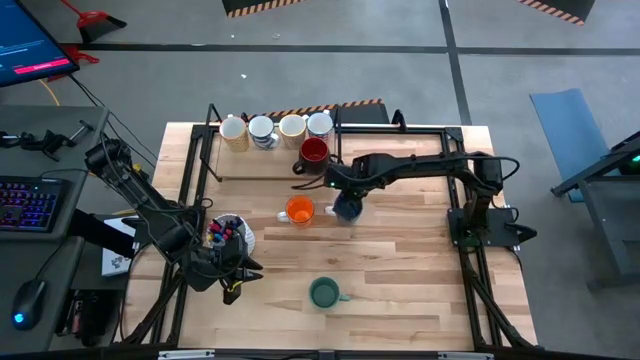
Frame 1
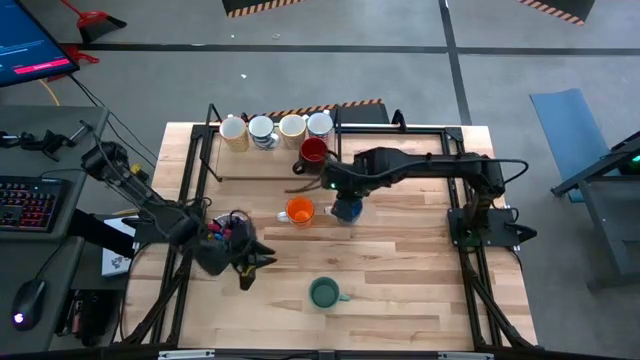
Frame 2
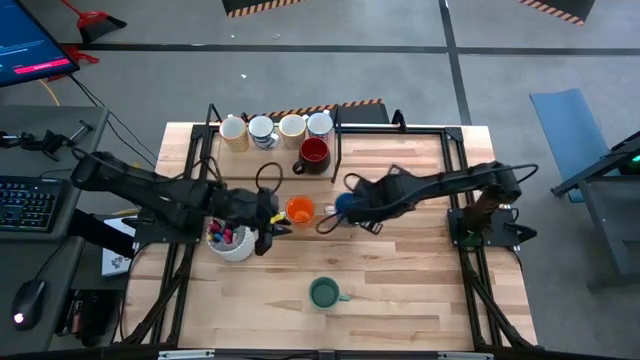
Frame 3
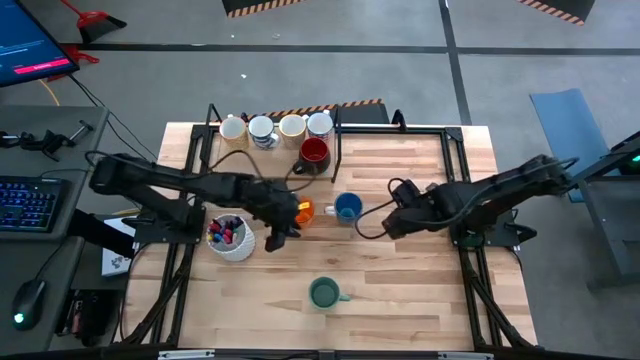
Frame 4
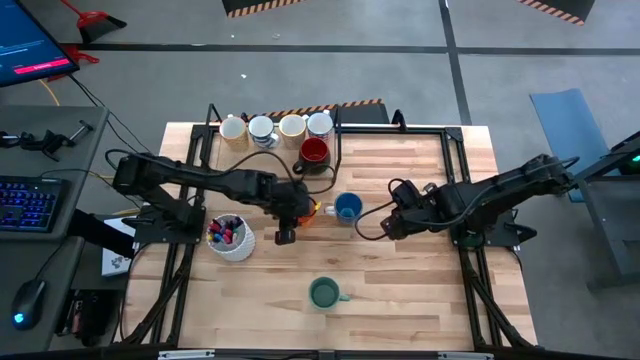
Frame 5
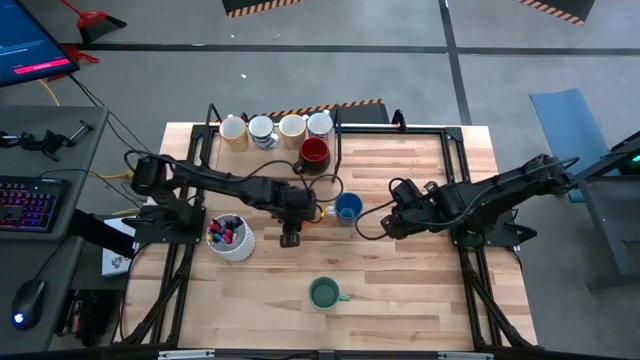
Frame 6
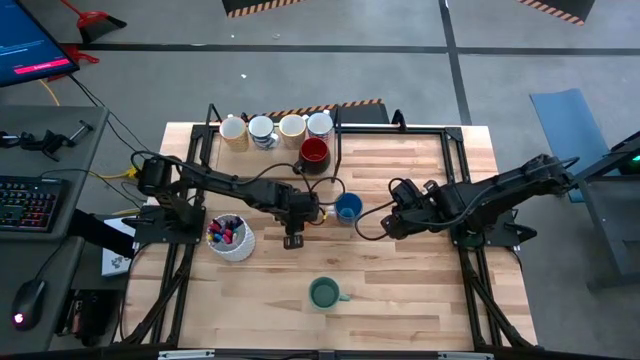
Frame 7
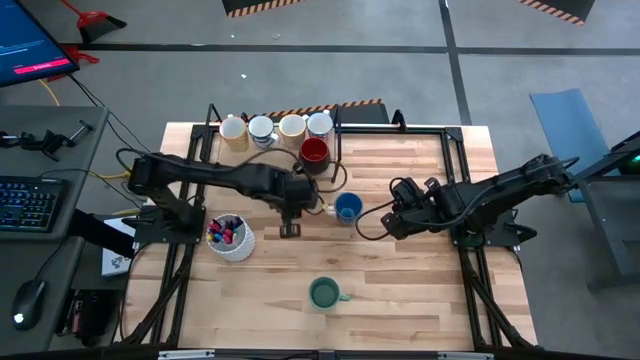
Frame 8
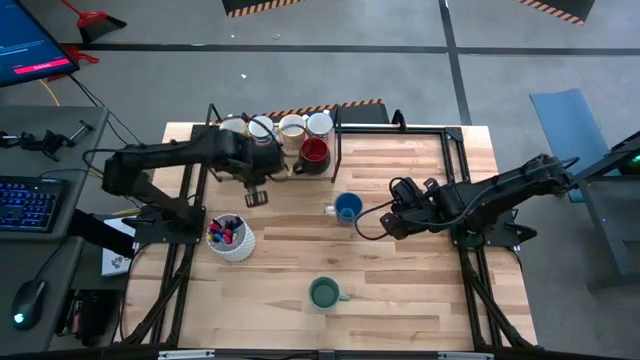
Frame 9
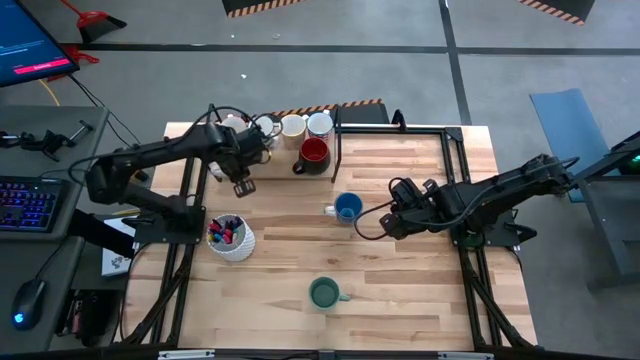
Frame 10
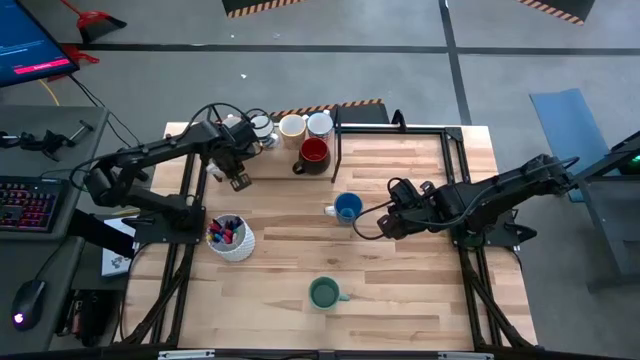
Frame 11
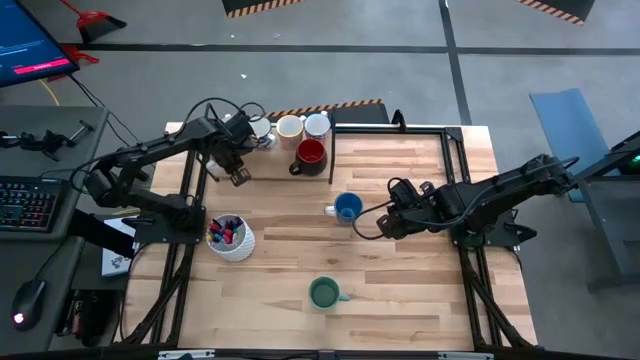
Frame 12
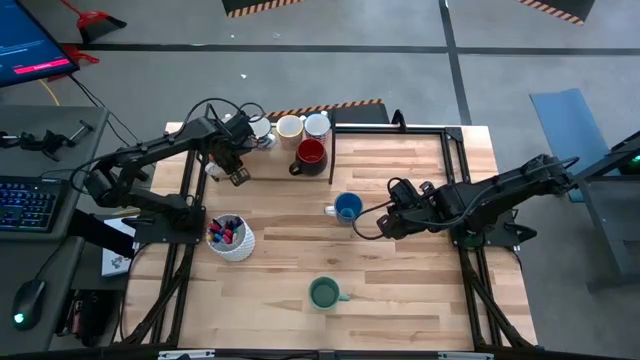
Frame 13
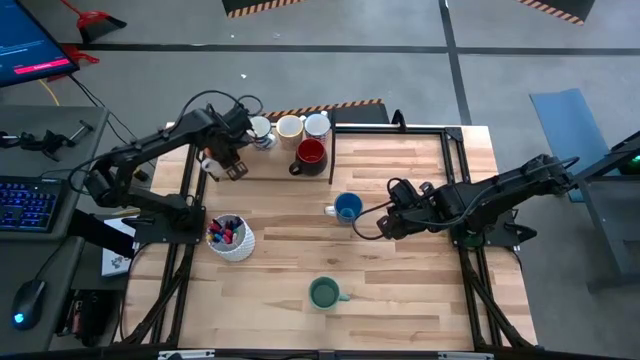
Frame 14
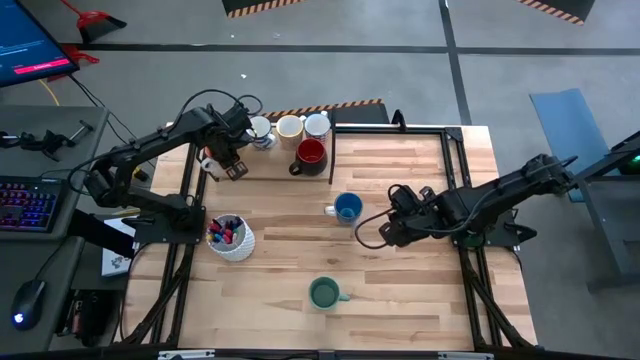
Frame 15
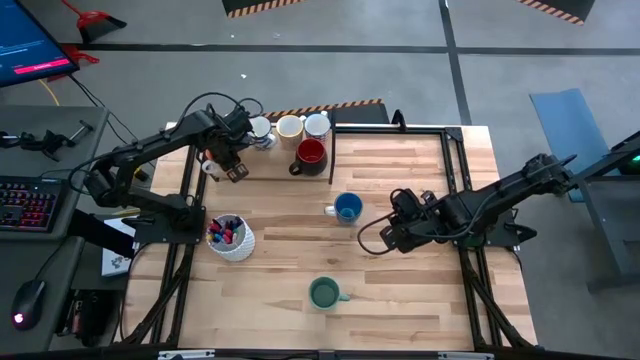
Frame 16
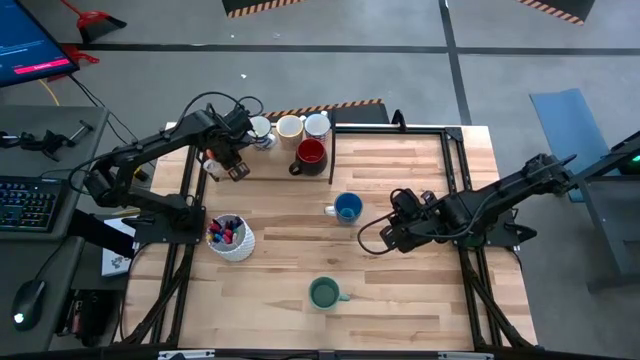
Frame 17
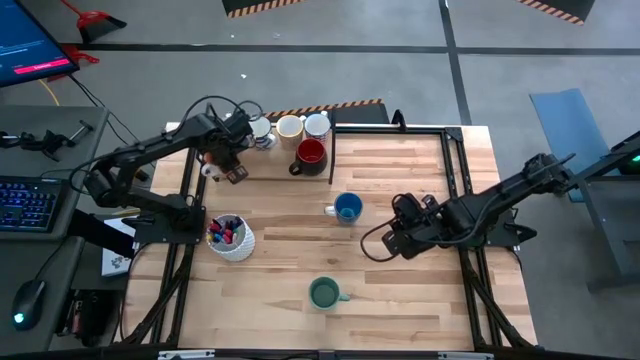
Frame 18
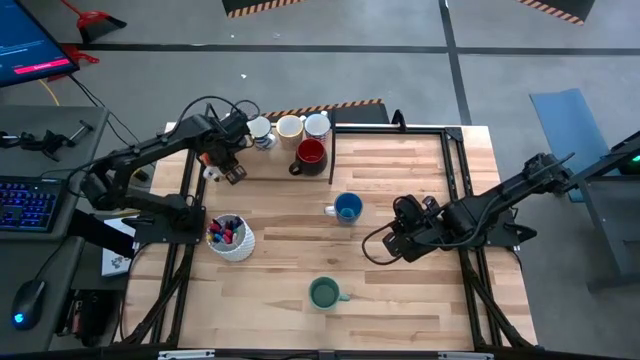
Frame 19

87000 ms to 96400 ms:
Task: Place coffee mugs
Put the orange mug on the shelf

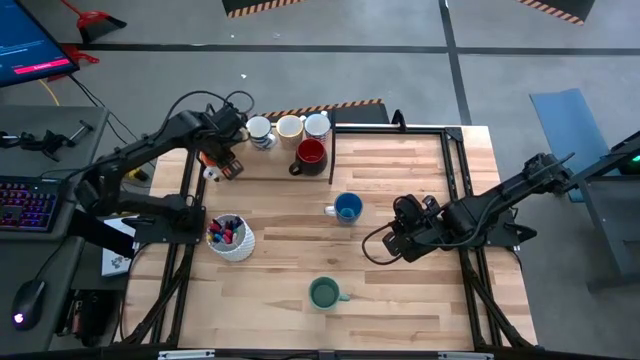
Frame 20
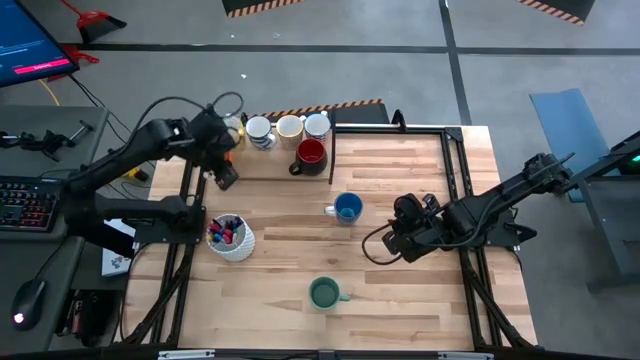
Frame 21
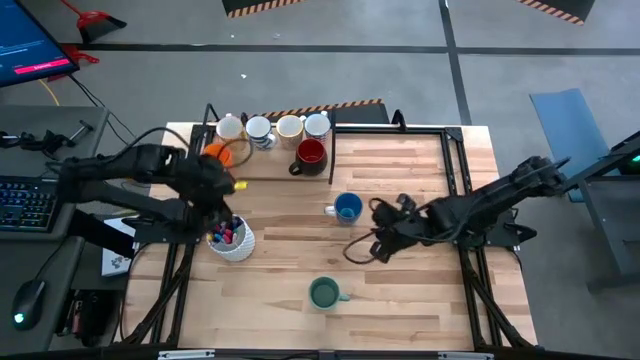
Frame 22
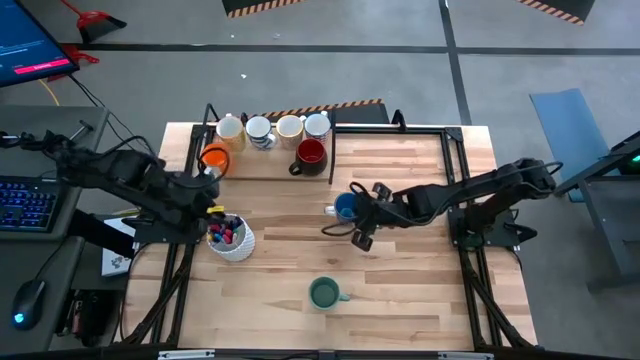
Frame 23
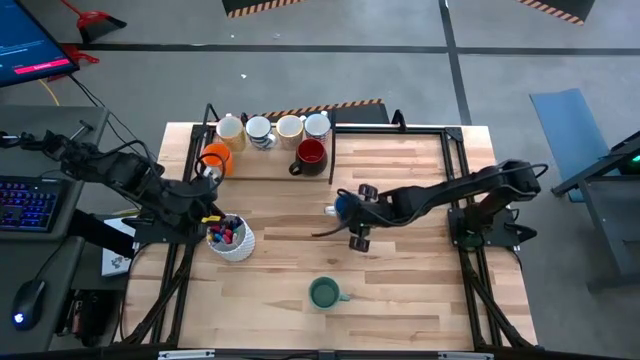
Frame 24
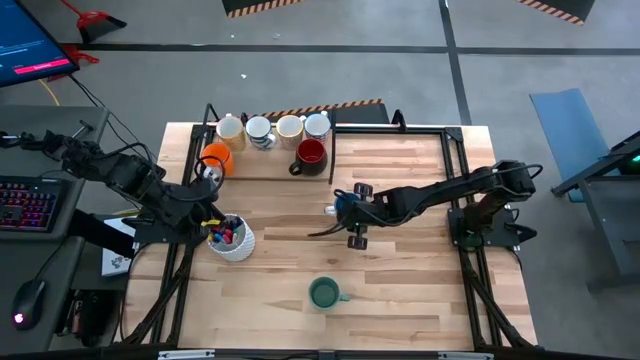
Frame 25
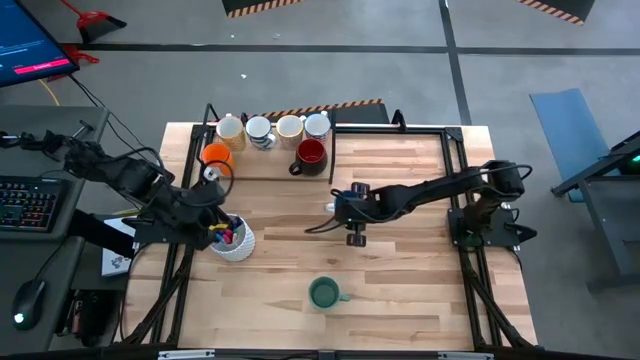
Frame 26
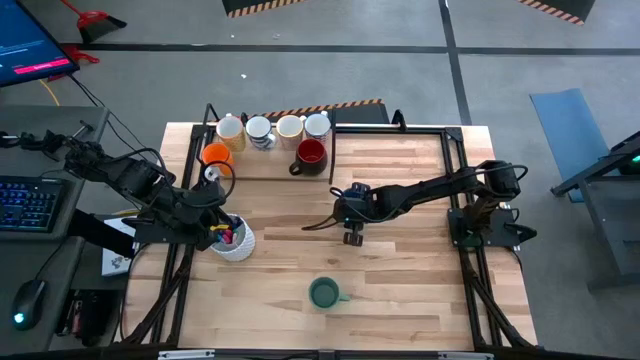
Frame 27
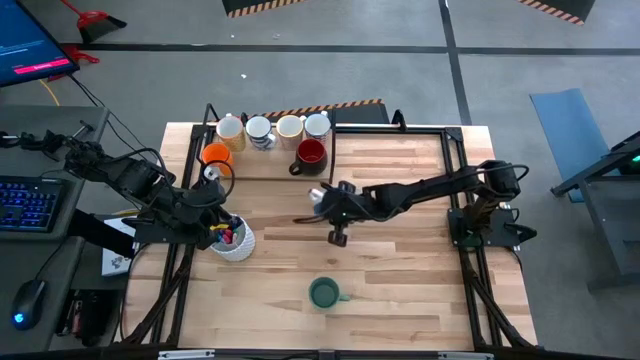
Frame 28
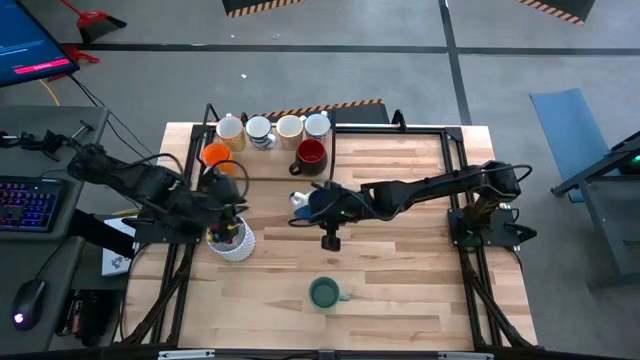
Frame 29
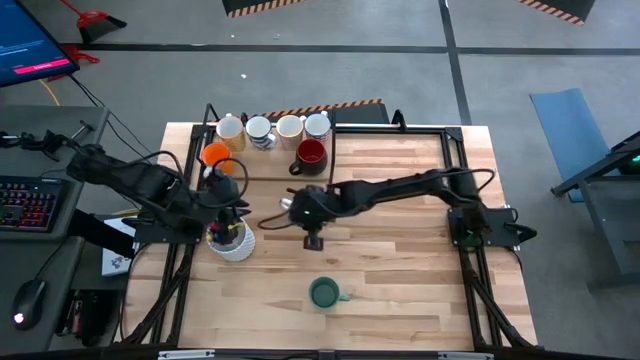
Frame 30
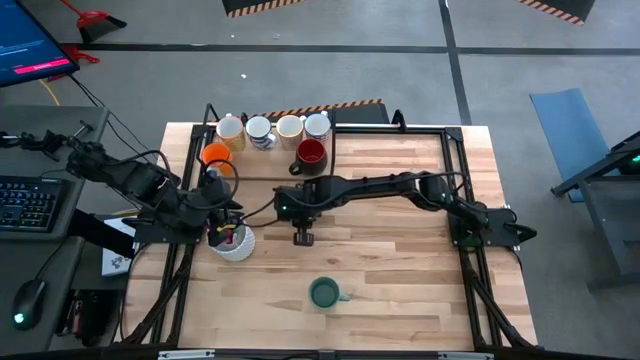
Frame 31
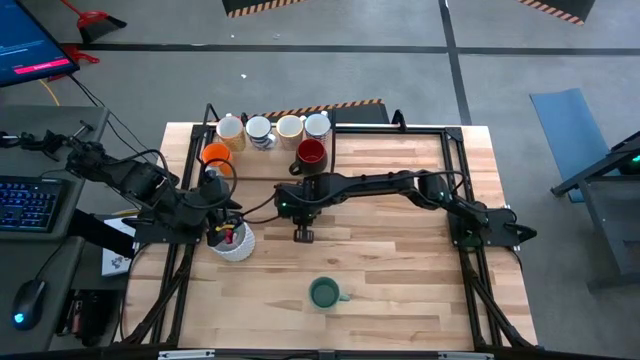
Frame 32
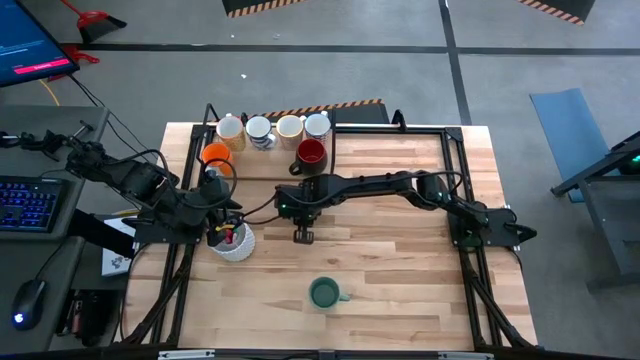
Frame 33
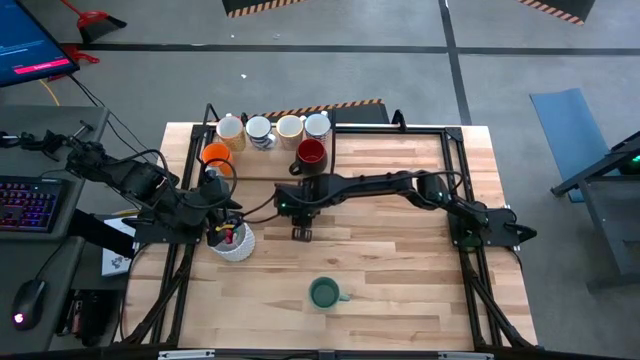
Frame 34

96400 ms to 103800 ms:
Move the blue mug to the center of the table

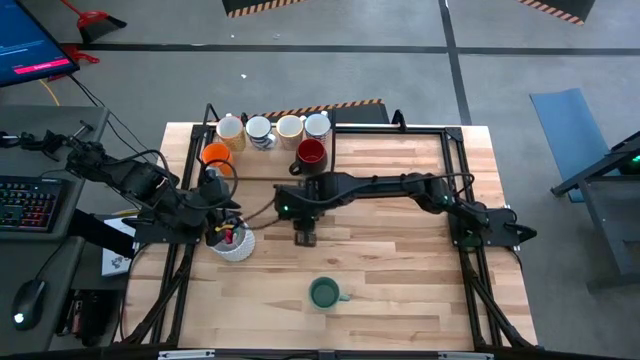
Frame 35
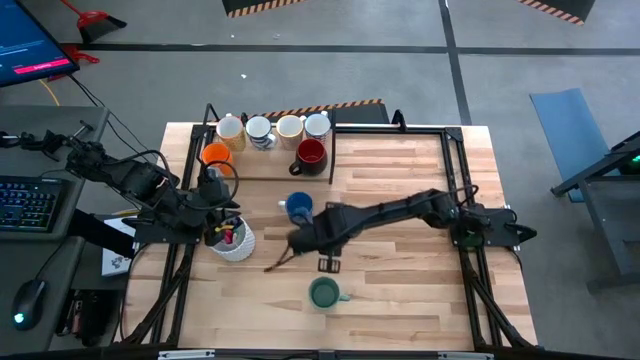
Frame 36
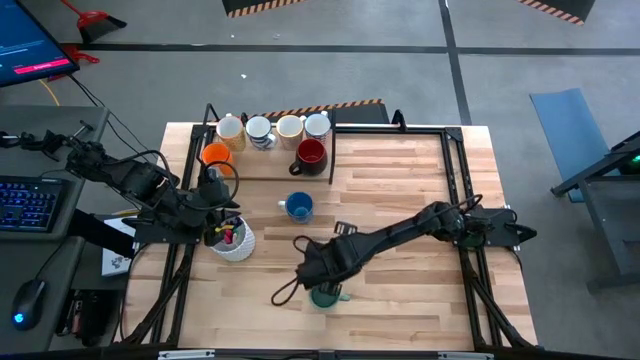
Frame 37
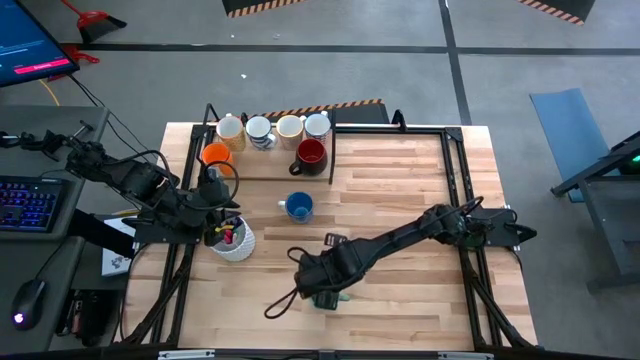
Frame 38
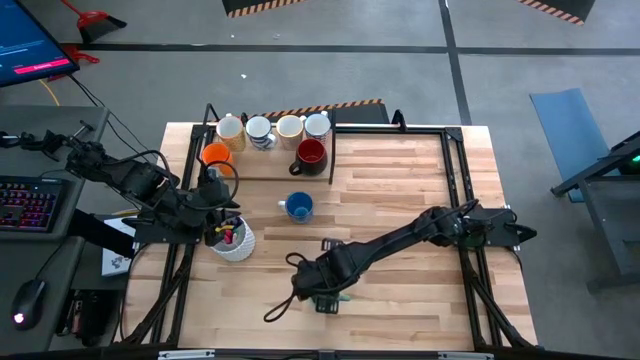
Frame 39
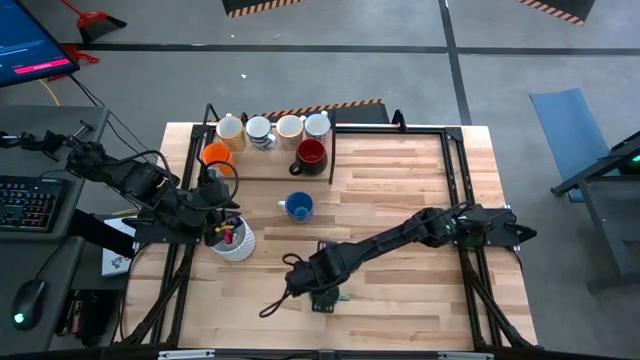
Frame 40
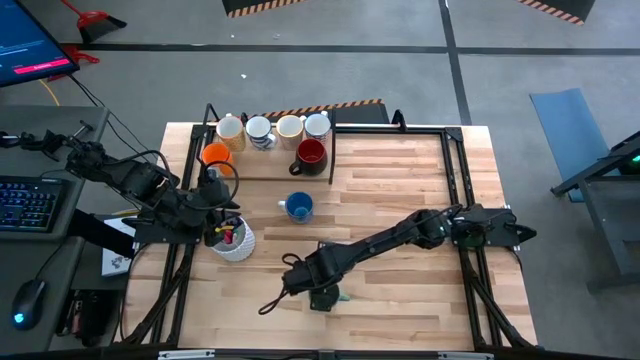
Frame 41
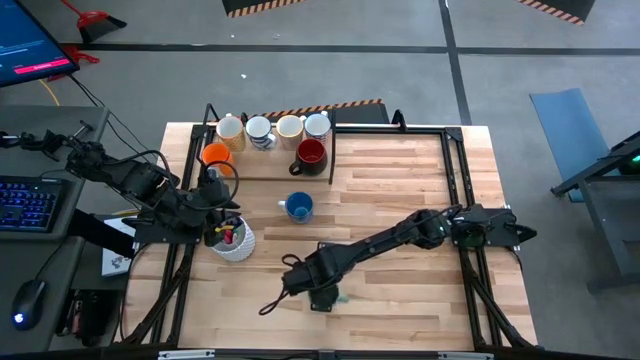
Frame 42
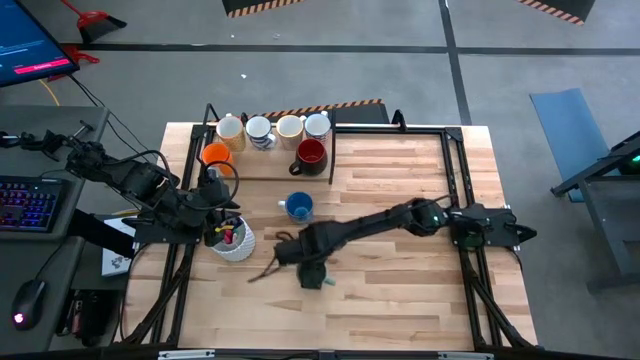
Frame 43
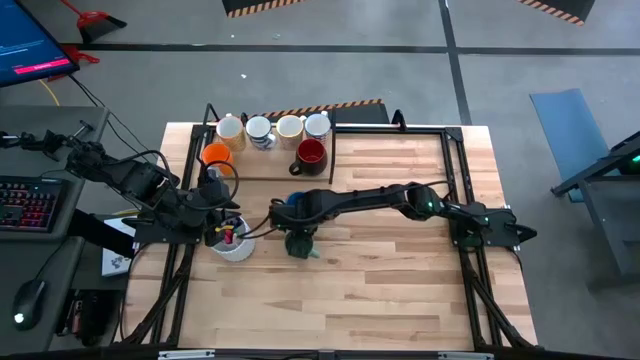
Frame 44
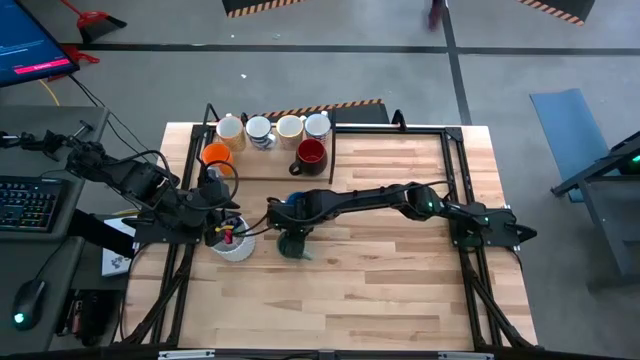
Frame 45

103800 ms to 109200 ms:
Move the green mug to the center
